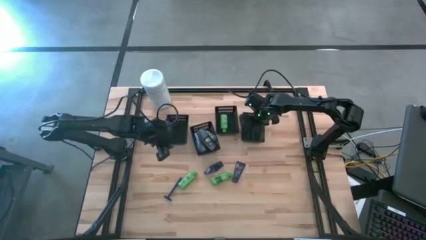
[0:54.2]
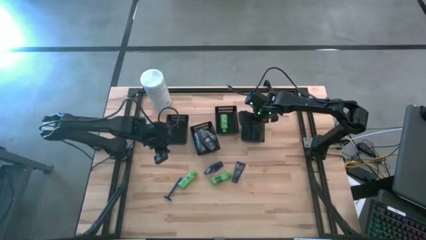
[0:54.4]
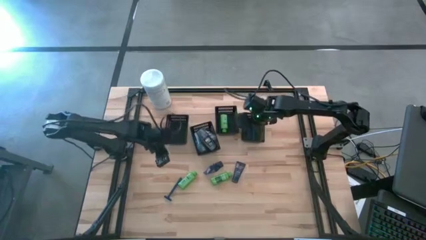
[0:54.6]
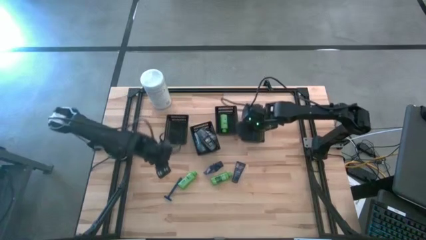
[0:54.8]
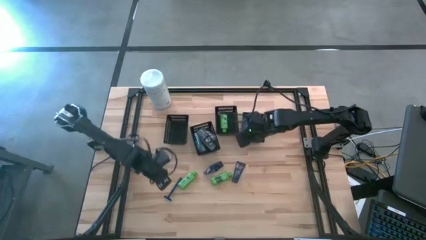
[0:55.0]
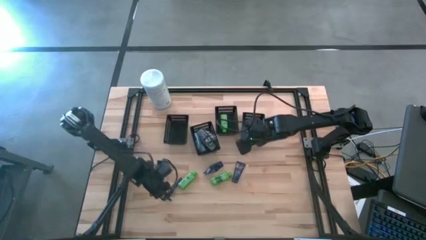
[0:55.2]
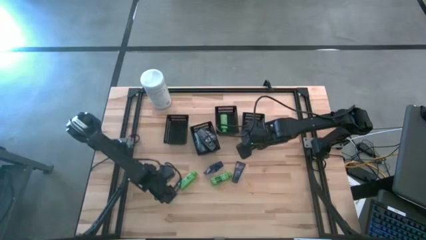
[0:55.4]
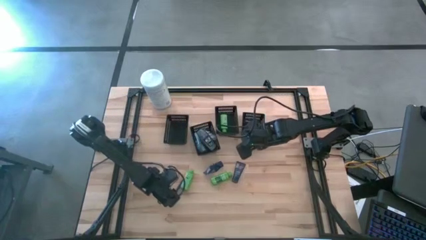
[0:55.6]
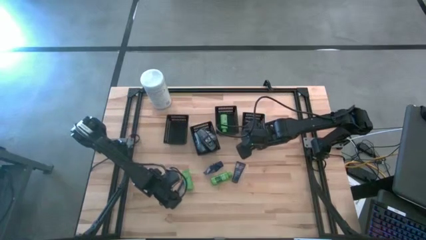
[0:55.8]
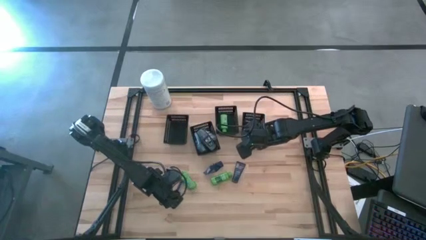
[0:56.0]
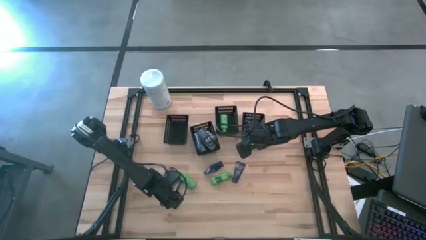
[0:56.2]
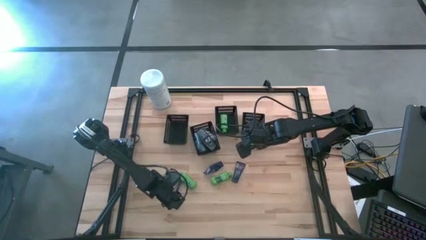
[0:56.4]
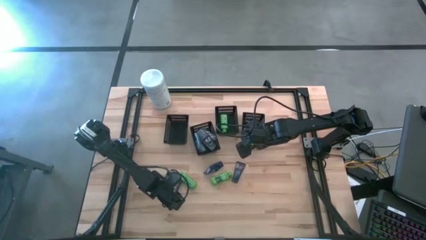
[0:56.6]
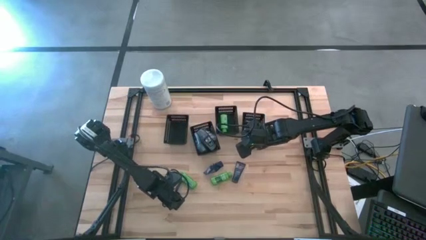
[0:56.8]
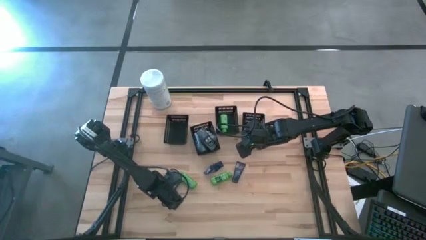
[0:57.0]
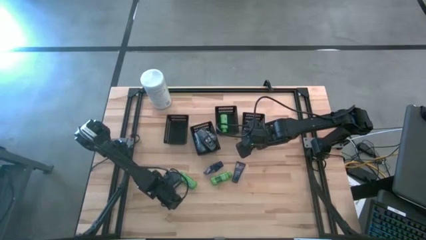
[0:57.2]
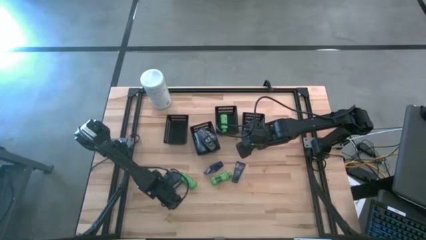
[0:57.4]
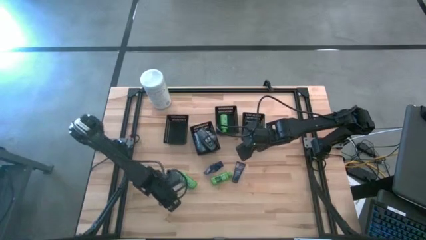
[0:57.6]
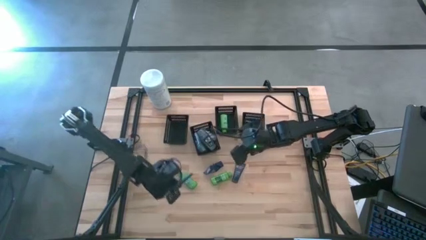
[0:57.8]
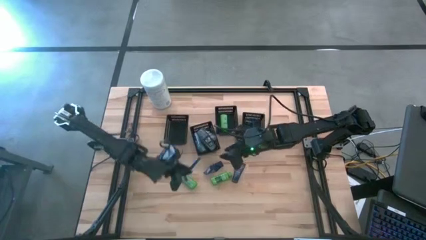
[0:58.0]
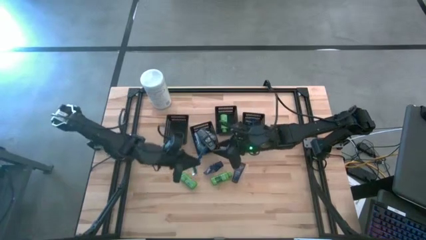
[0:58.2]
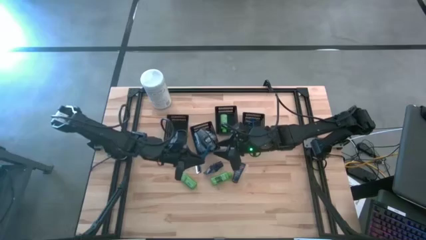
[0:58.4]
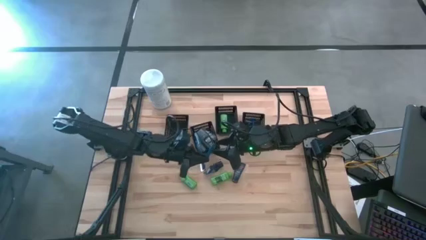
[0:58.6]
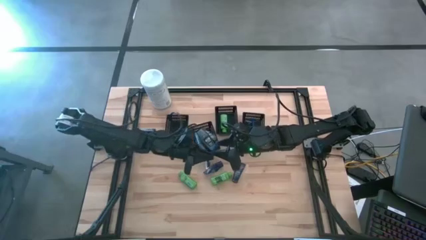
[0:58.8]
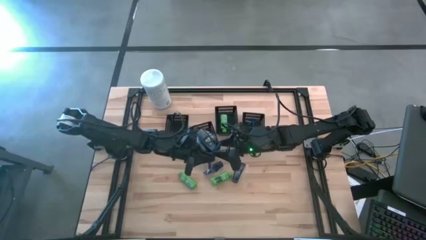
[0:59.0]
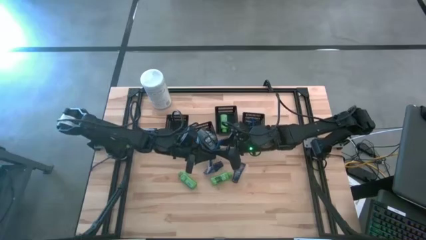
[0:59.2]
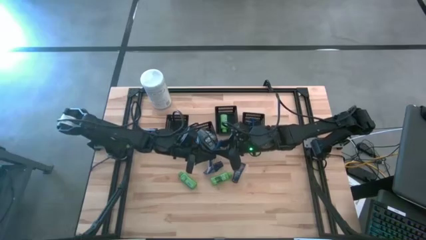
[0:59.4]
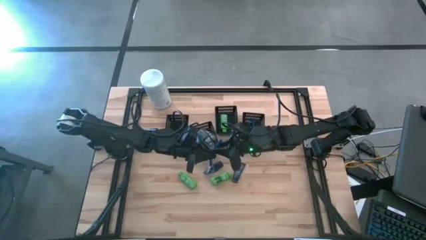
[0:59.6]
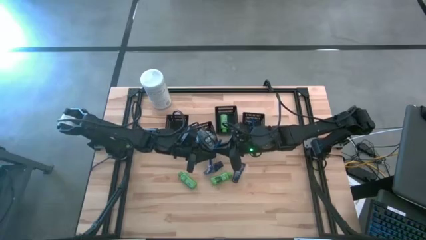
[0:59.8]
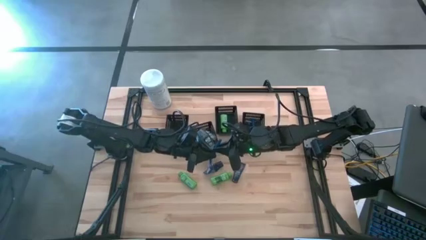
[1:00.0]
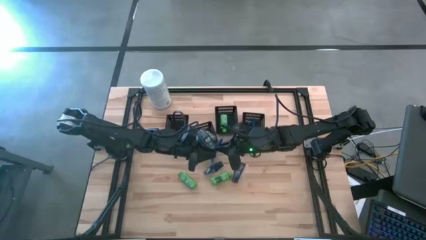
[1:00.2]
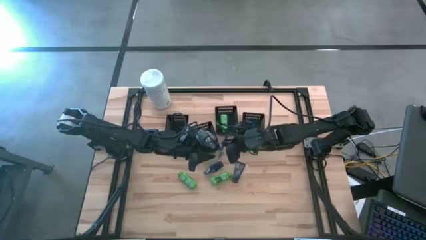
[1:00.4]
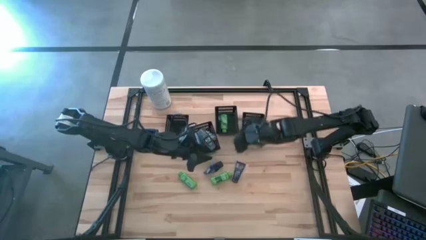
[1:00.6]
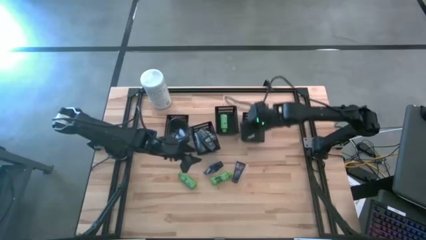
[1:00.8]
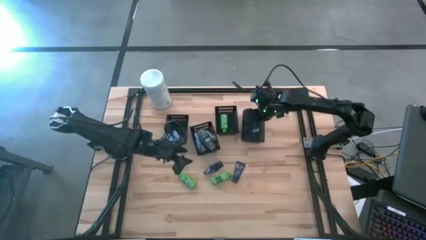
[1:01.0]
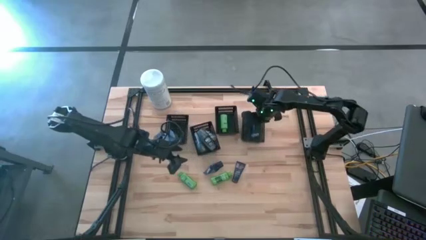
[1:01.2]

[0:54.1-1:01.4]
Task: Pick & Place Travel size toiletries
Put the razor into the right bin

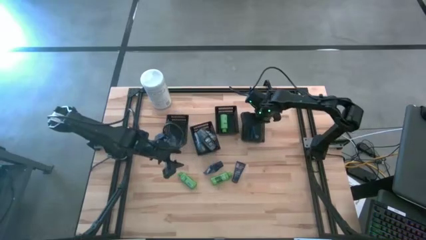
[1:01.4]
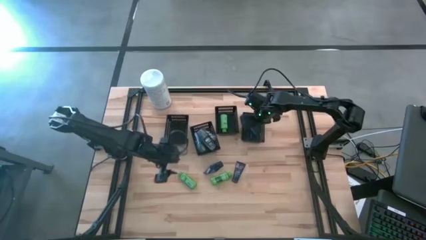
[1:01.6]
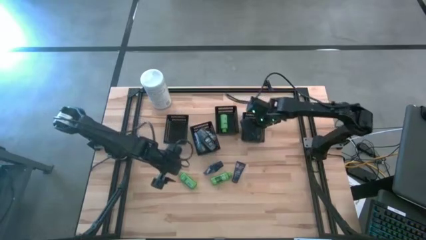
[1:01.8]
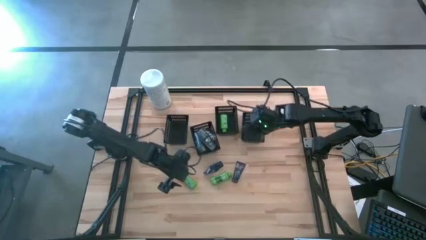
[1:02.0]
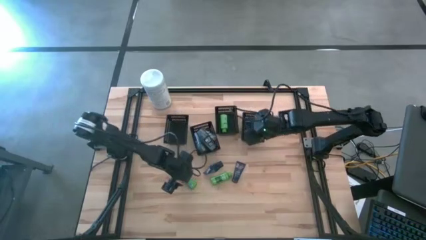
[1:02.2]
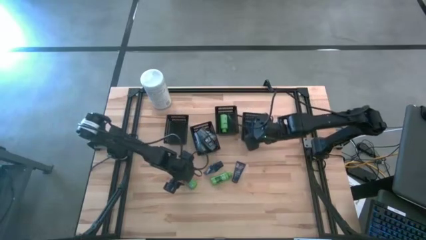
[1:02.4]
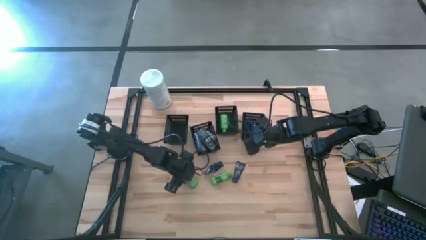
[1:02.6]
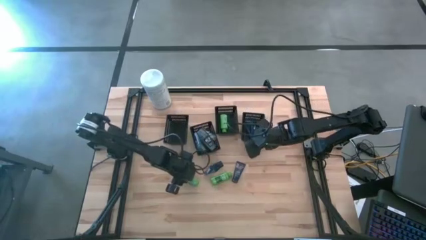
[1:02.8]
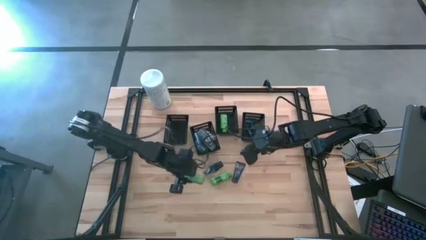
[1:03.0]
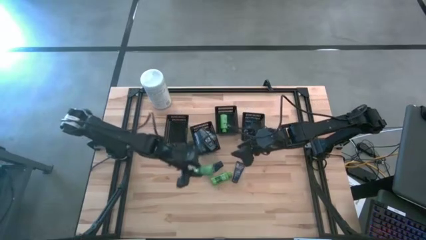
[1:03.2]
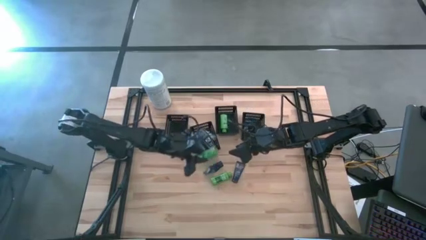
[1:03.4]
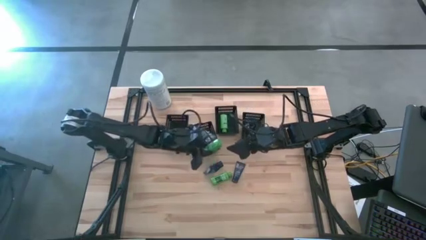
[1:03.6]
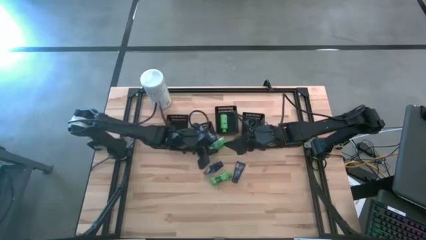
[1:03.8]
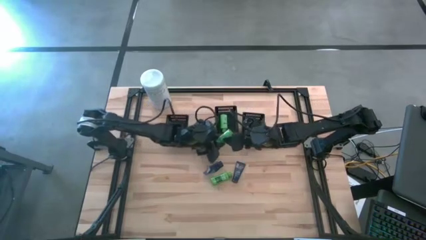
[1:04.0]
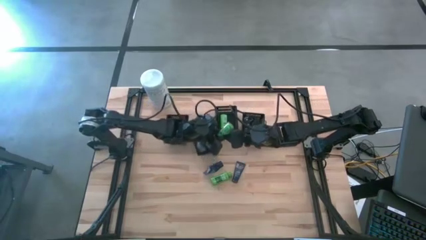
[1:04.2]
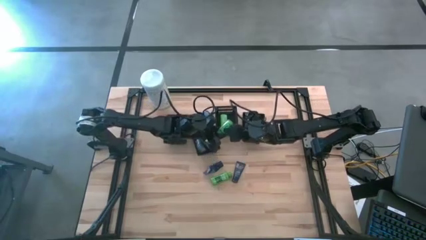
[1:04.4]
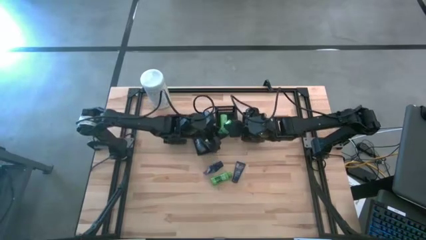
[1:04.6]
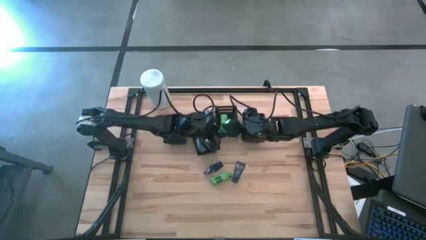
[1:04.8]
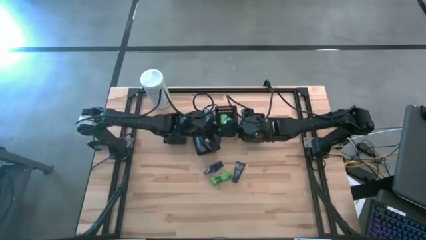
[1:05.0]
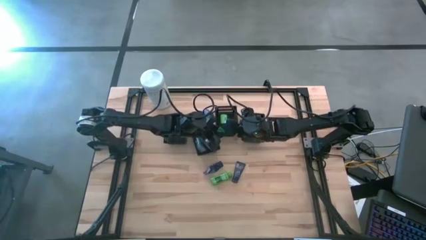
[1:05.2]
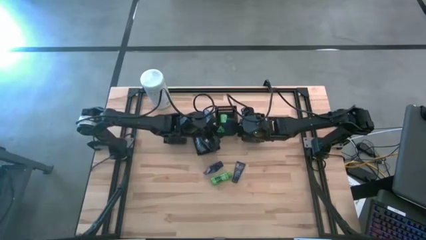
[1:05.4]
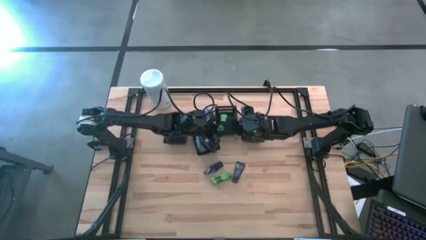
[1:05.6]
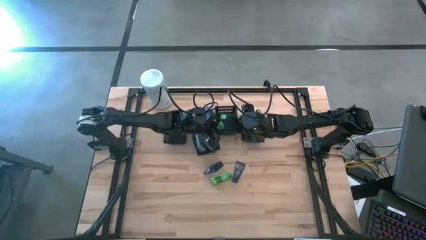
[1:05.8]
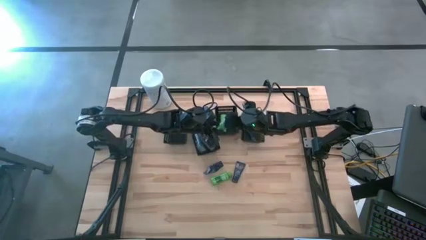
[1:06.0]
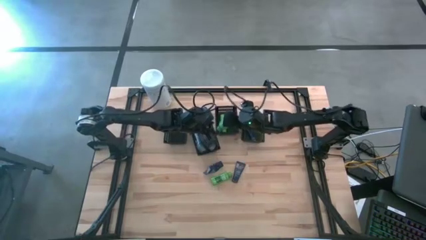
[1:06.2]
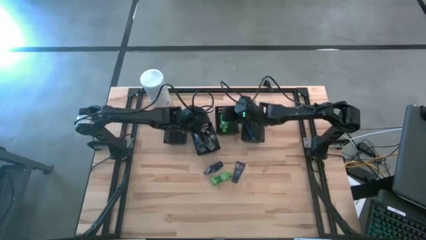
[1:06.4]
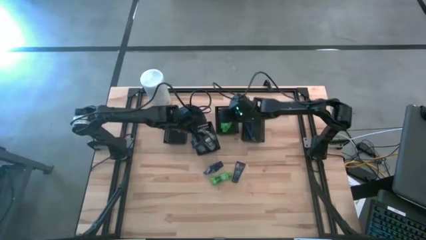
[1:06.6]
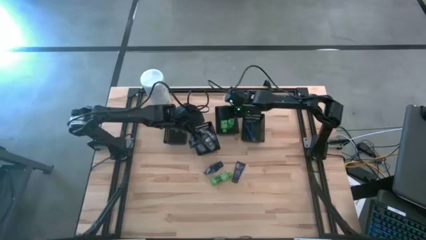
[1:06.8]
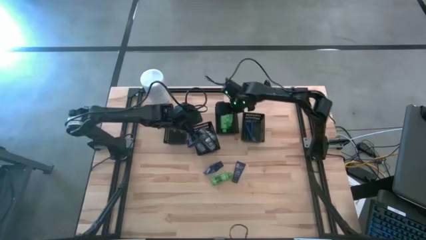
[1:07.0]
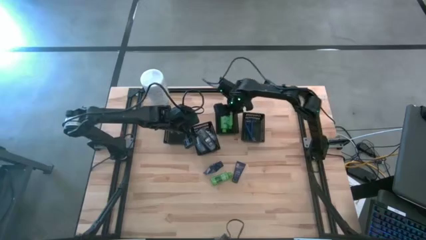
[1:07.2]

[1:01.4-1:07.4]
Put the left shampoo bottle in the middle right bin

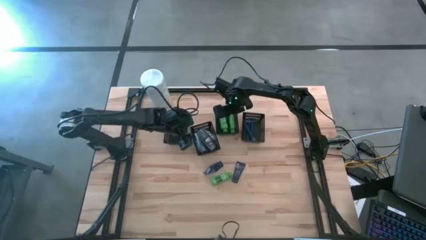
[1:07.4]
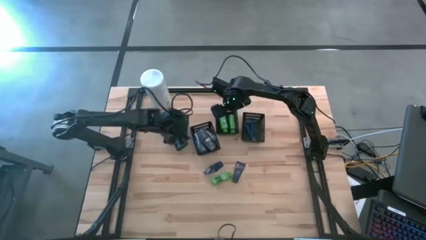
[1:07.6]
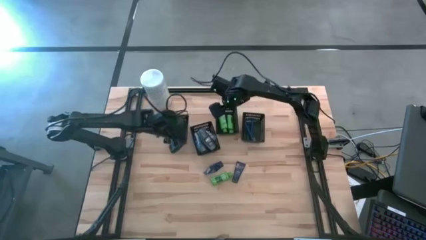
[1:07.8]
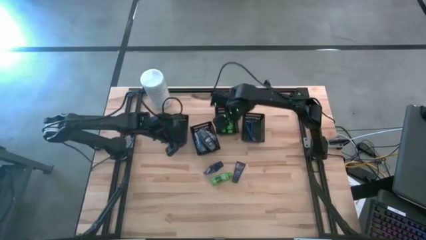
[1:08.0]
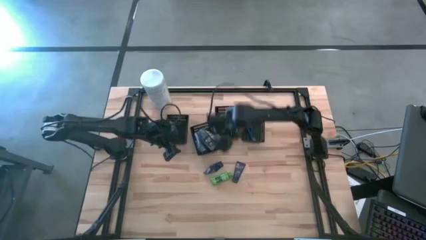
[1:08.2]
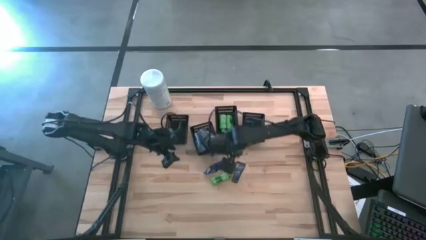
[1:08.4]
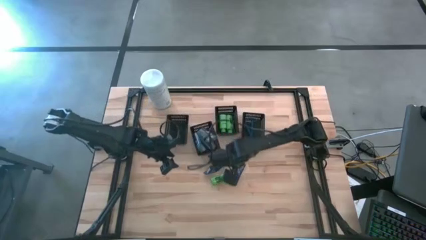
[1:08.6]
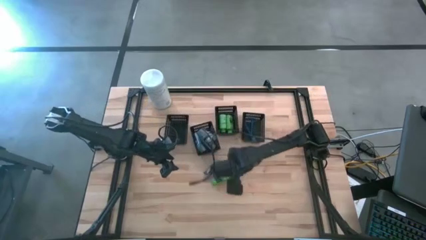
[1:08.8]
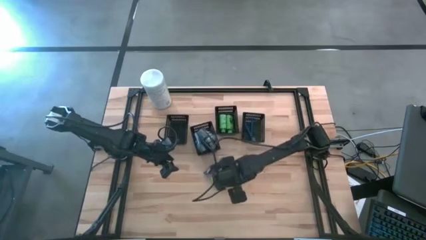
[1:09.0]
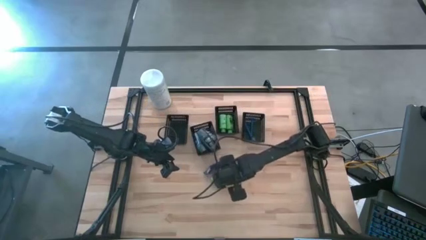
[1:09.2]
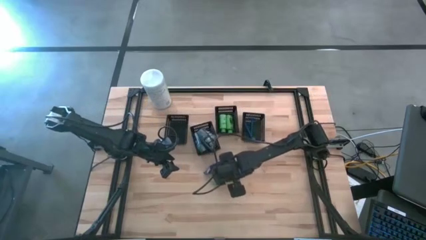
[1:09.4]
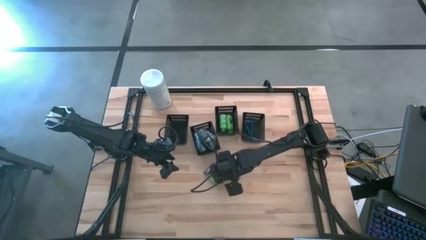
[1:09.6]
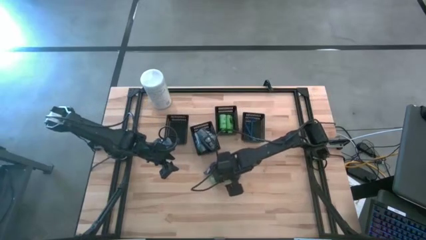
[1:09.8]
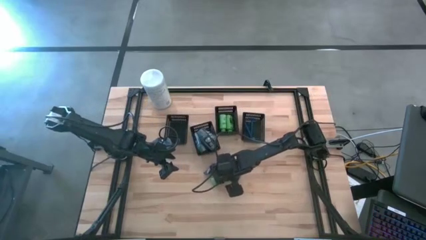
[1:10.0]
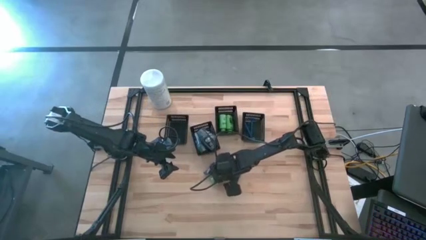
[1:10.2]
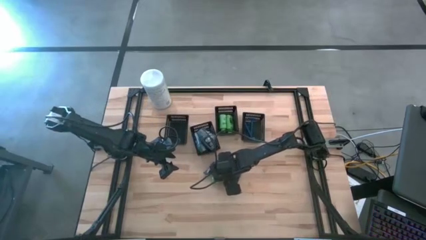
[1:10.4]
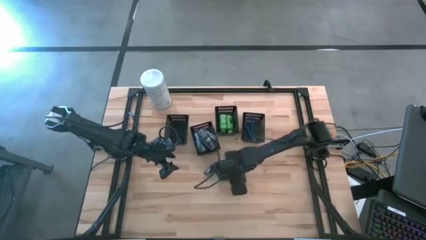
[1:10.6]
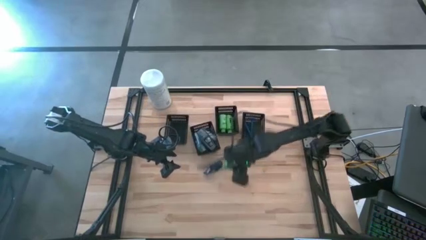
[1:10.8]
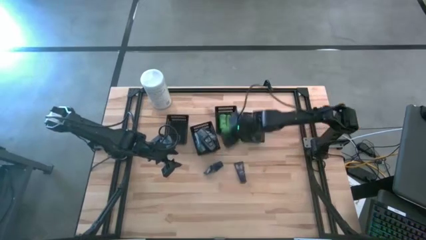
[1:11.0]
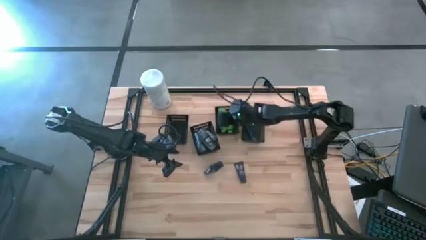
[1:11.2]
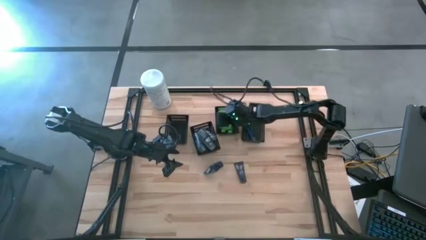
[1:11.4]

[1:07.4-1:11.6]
Put the shampoo bottle into the middle right bin
